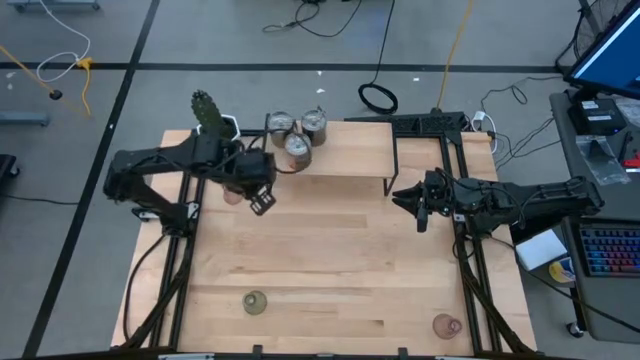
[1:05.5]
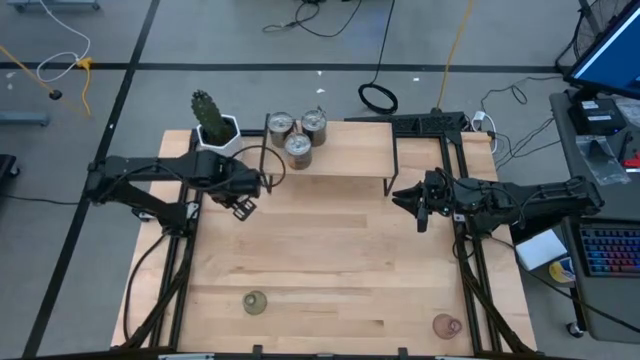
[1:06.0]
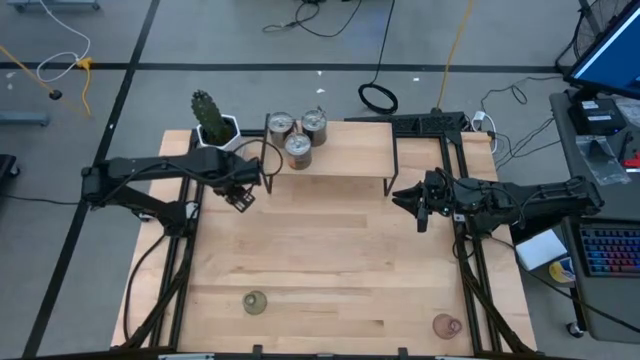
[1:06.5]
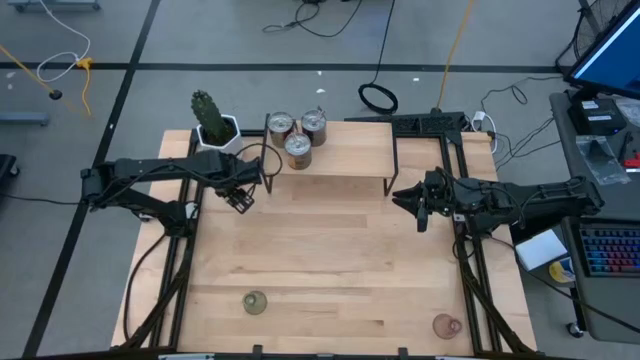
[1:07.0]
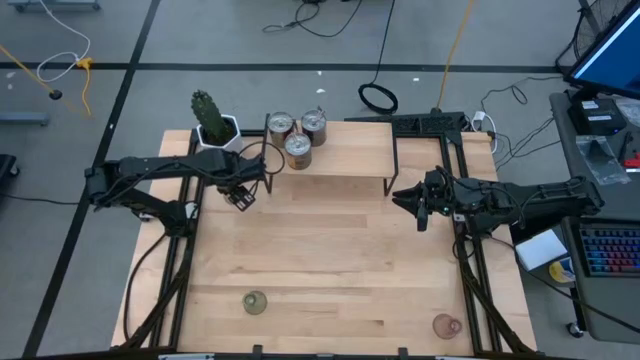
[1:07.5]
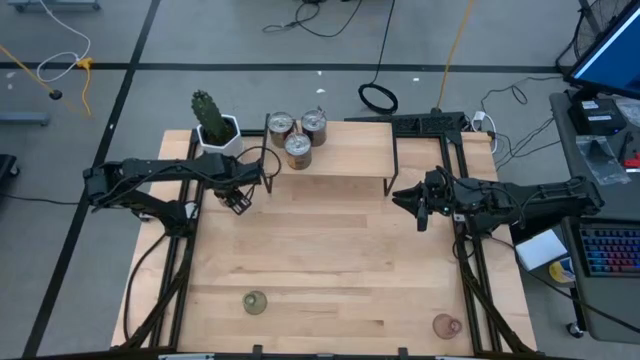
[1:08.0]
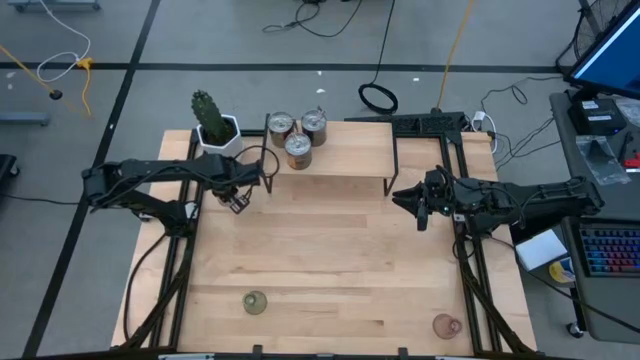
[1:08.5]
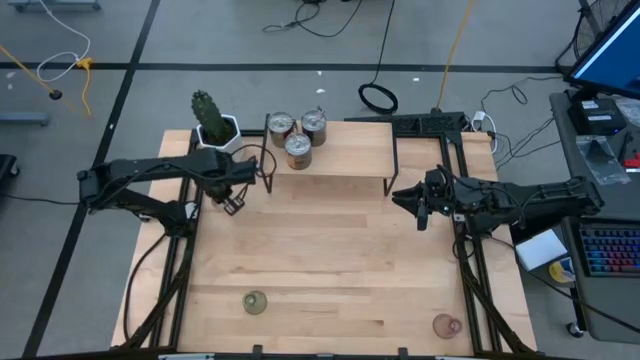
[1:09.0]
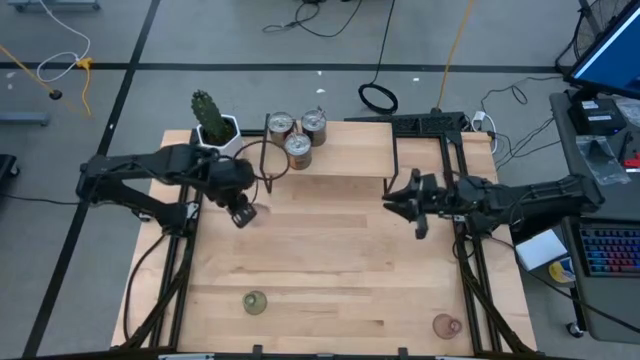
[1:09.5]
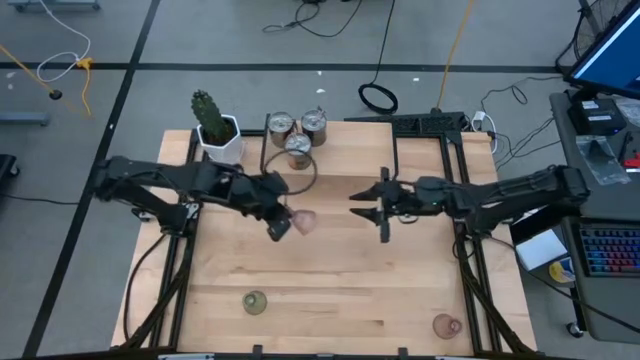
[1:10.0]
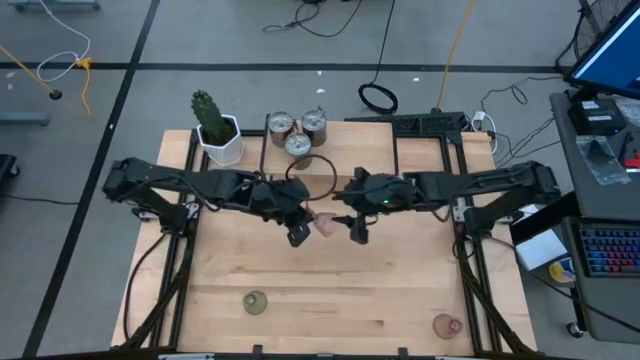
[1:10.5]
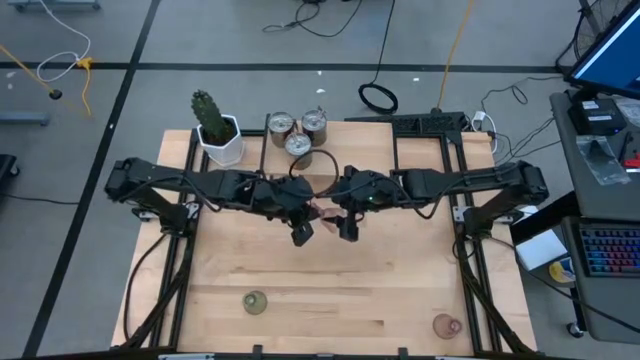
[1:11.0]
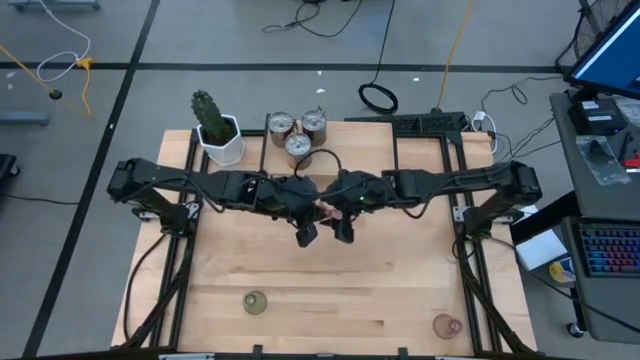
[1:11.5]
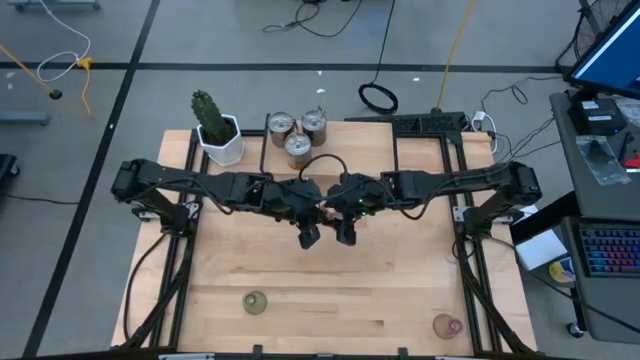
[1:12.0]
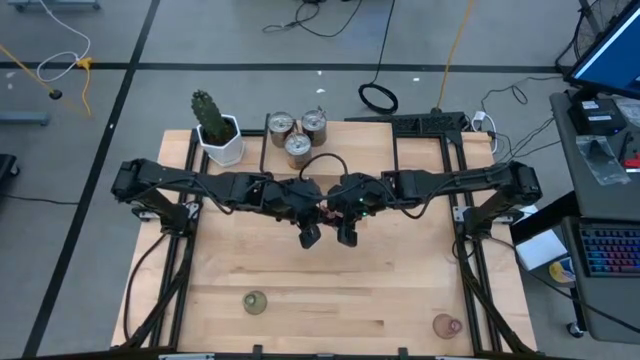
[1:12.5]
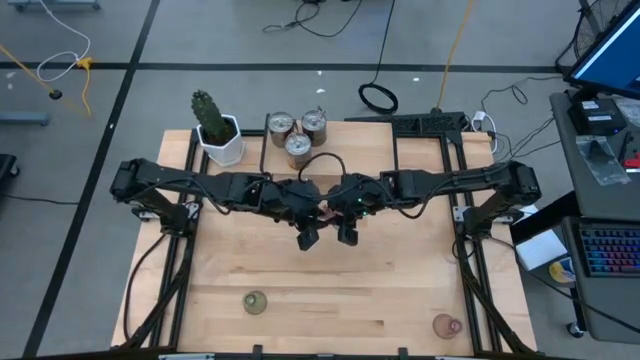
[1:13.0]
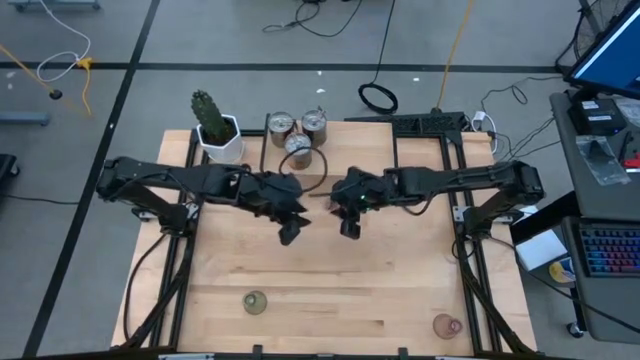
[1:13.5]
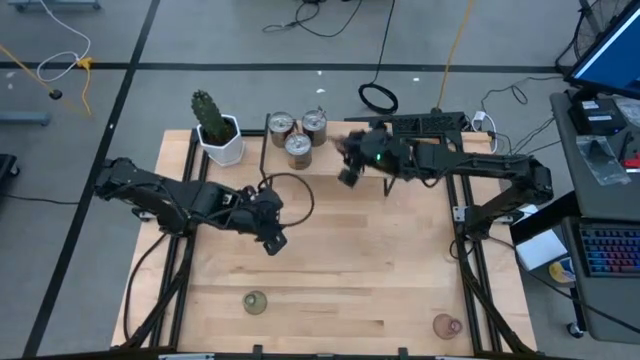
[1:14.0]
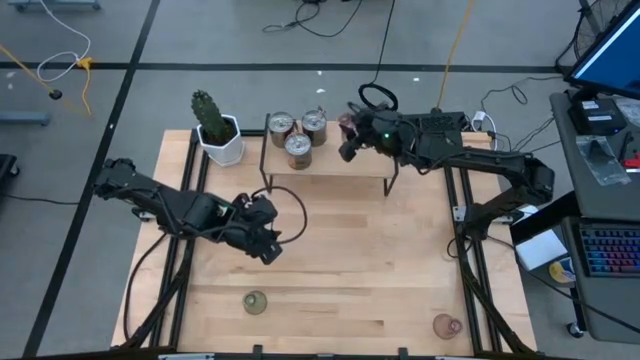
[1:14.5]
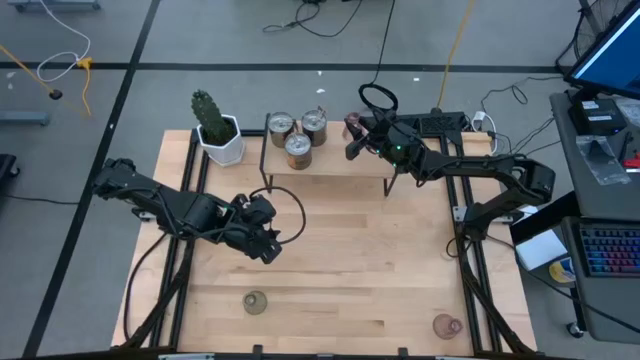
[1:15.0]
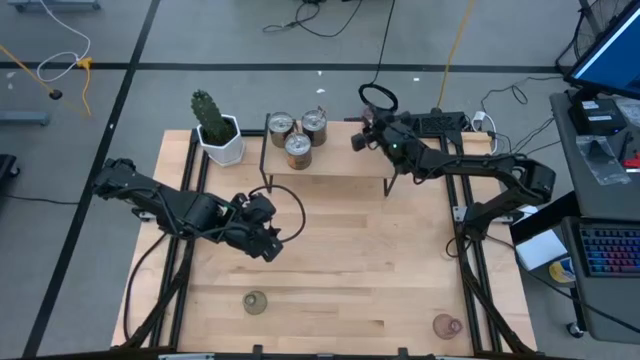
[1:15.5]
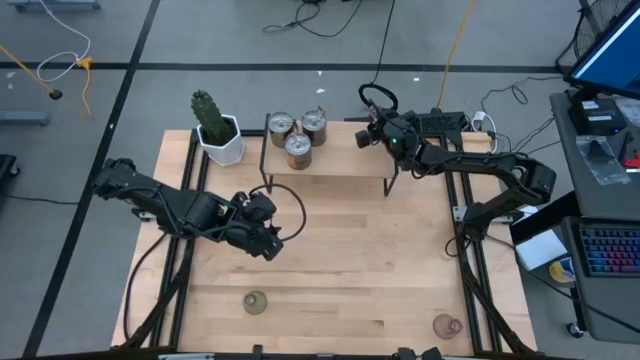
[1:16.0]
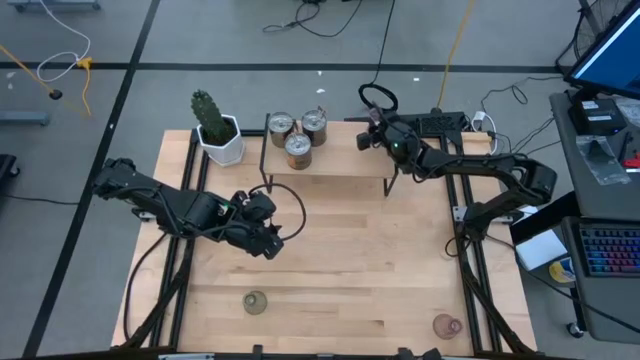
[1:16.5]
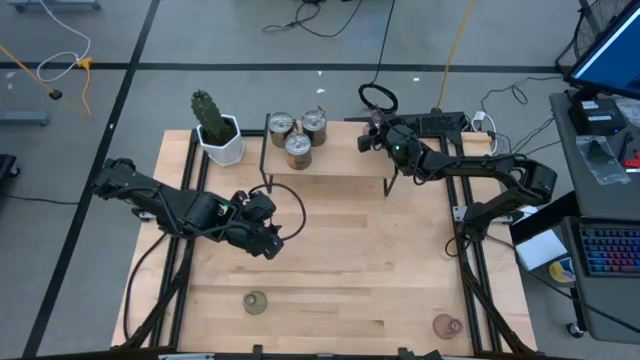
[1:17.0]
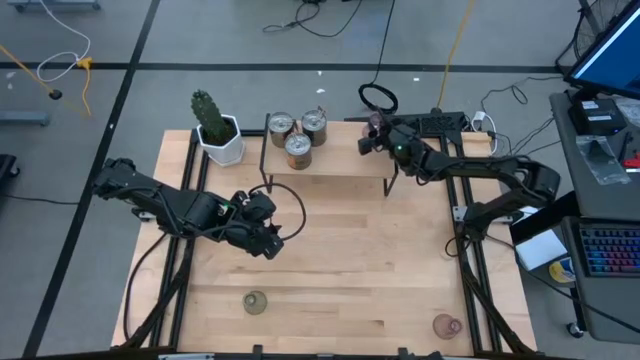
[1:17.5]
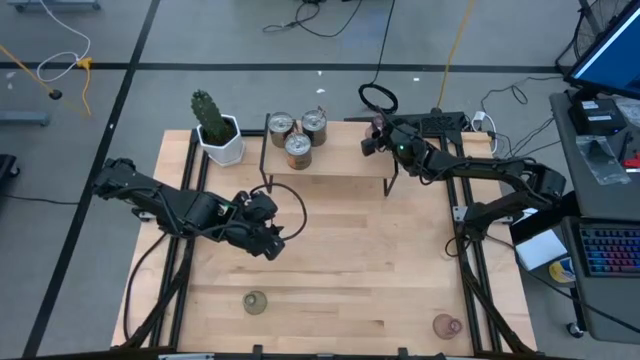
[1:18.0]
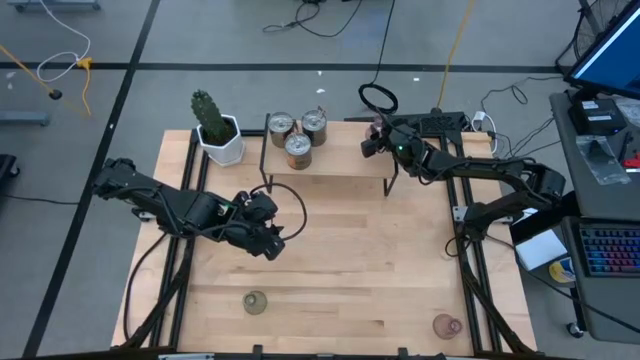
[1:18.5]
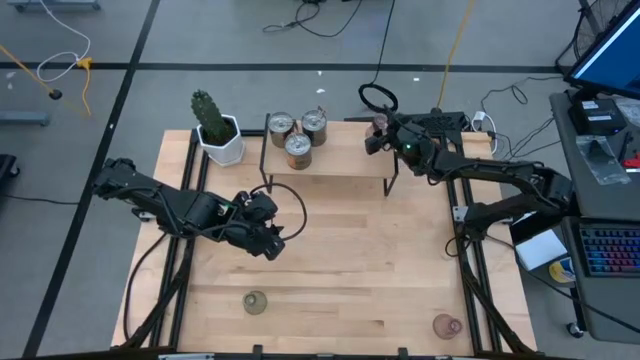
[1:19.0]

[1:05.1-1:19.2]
Task: Pick & Place candle stick holders
Put the top pink glass candle holder on the shelf

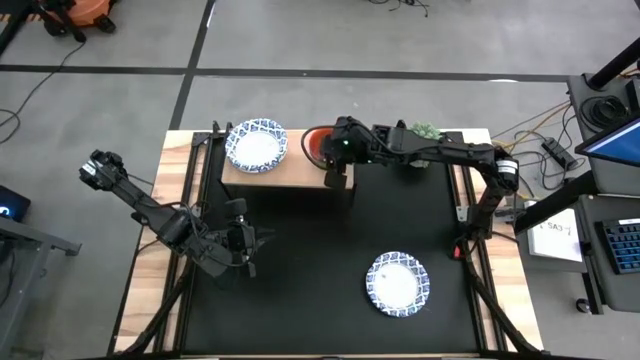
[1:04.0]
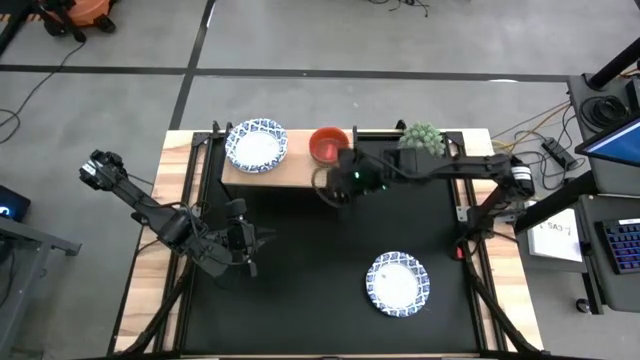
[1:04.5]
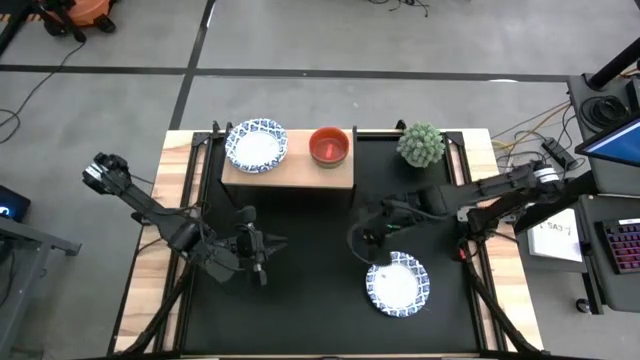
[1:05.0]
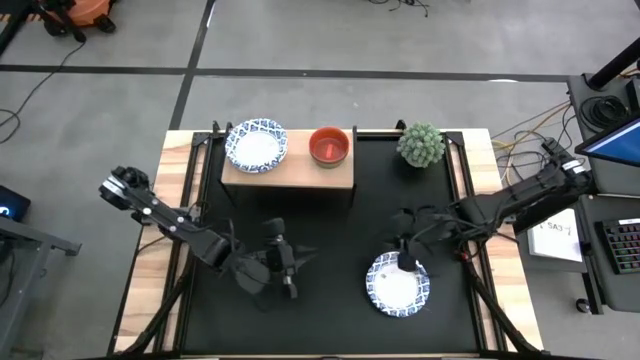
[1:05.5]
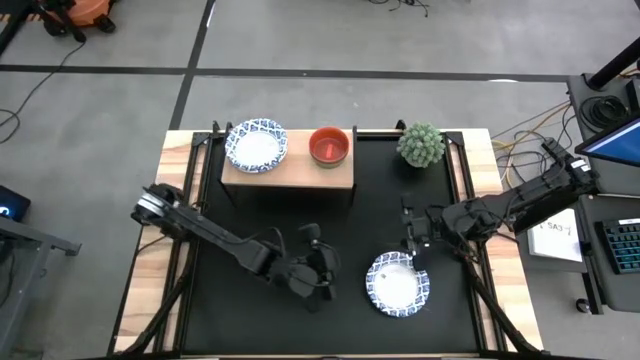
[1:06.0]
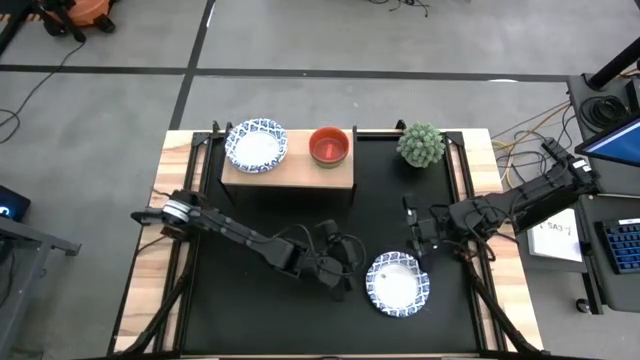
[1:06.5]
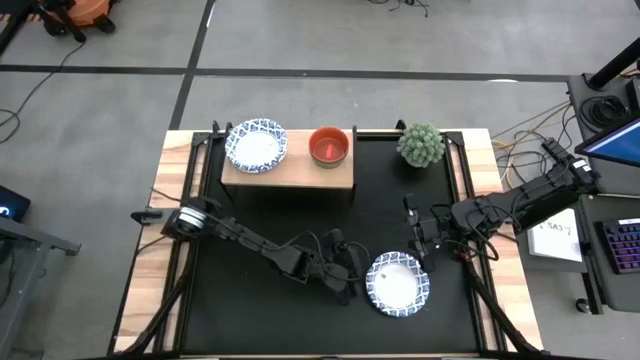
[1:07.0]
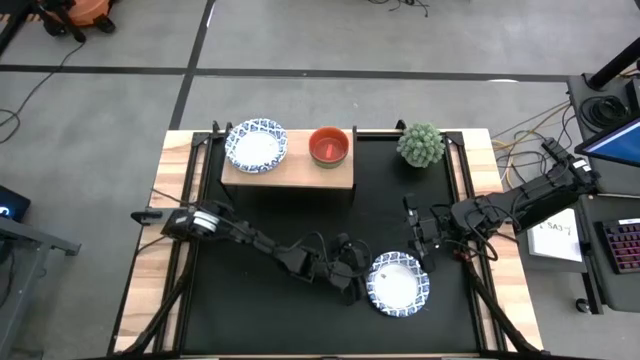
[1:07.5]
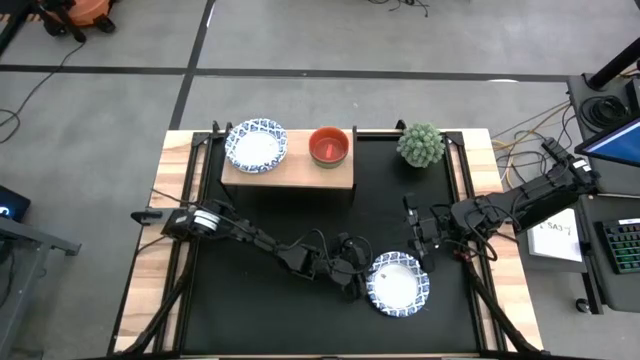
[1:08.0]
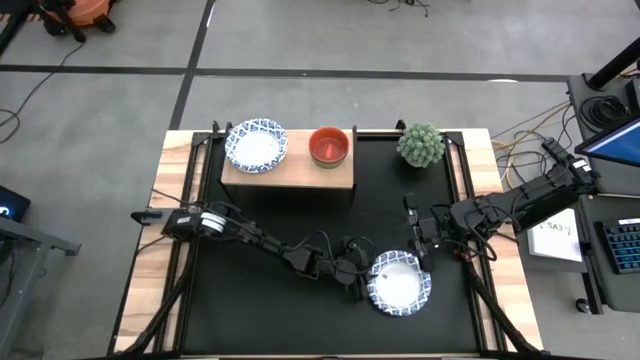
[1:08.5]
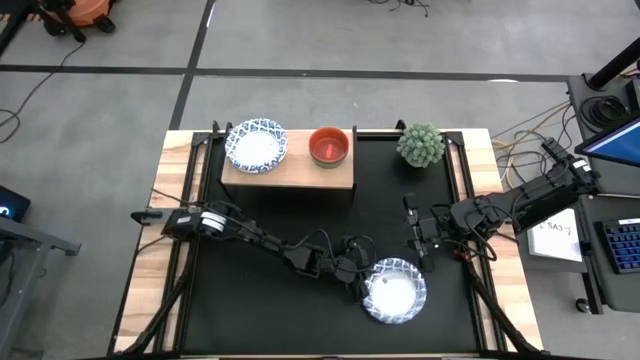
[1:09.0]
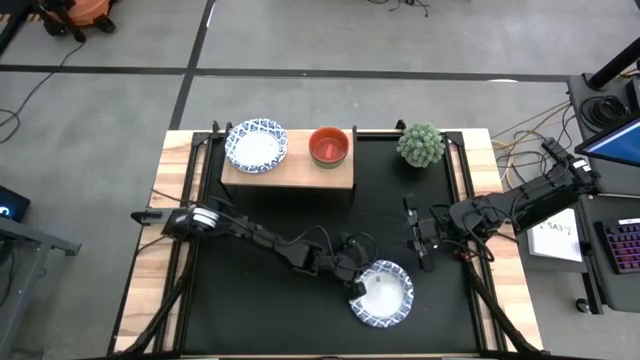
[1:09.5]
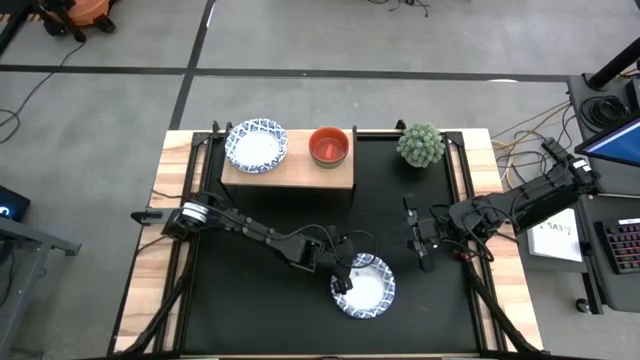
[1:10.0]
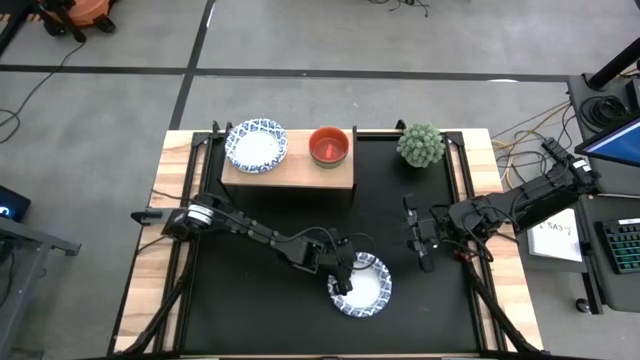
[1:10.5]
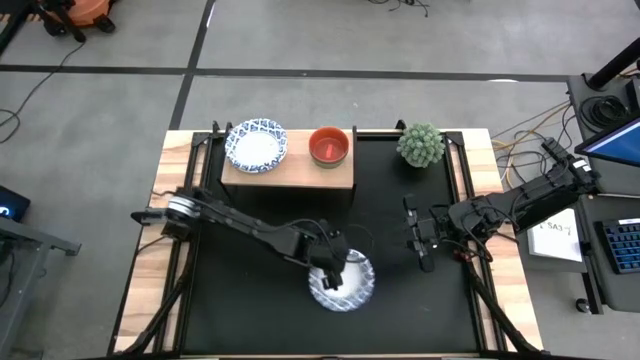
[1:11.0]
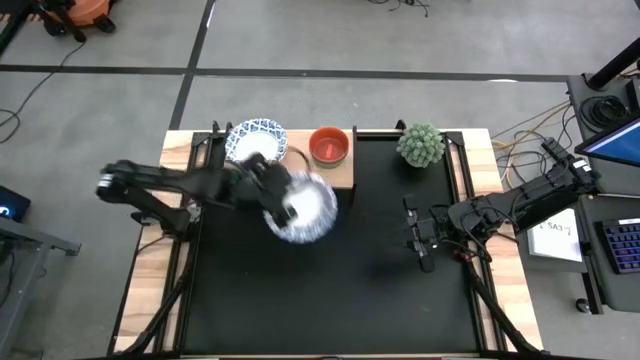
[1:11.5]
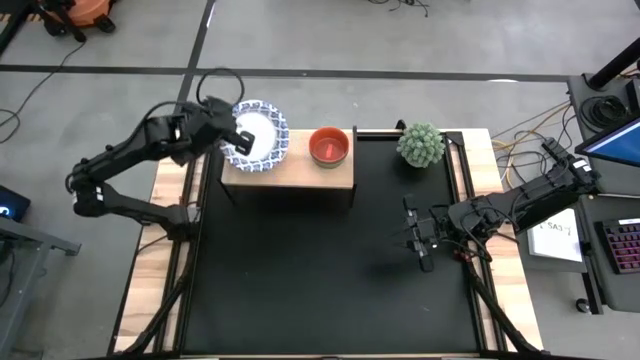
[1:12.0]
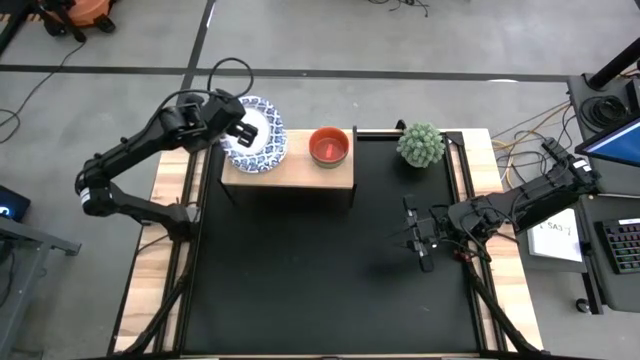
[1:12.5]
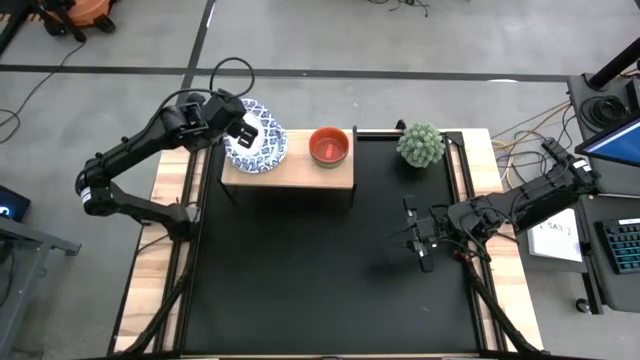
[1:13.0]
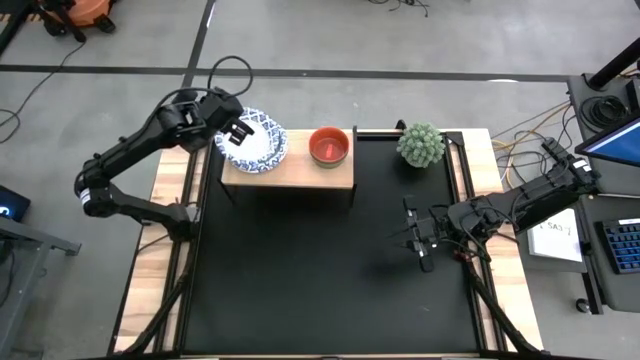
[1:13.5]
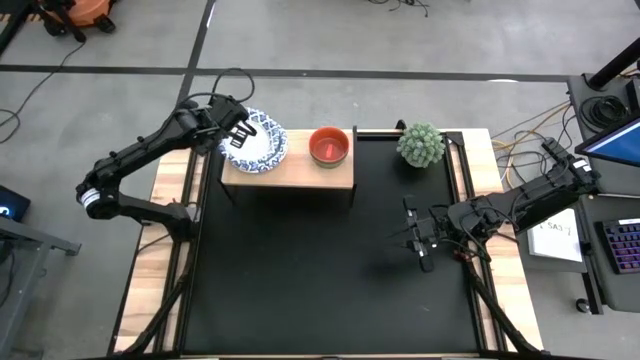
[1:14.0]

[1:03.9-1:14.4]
Task: Place and stack bowls onto a shelf
Stack the white bowl on top of the other white bowl on the shelf
